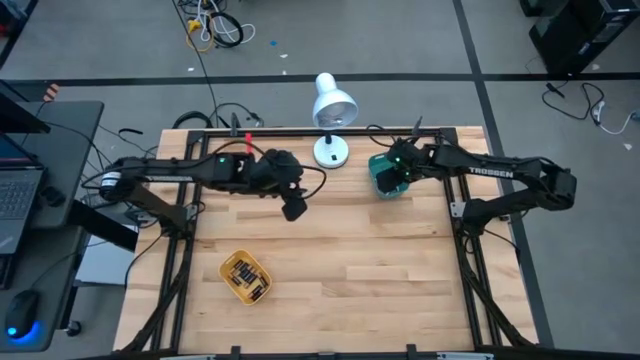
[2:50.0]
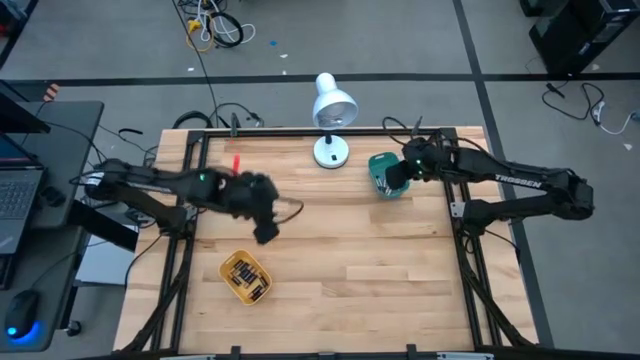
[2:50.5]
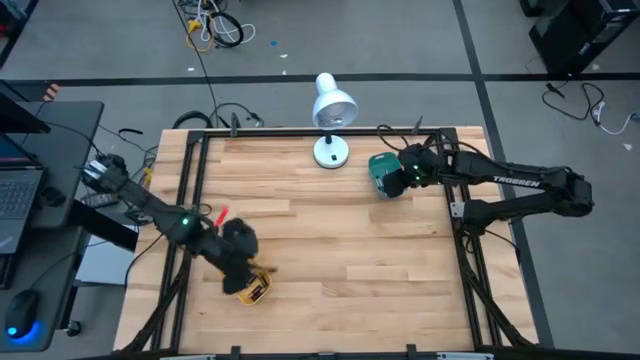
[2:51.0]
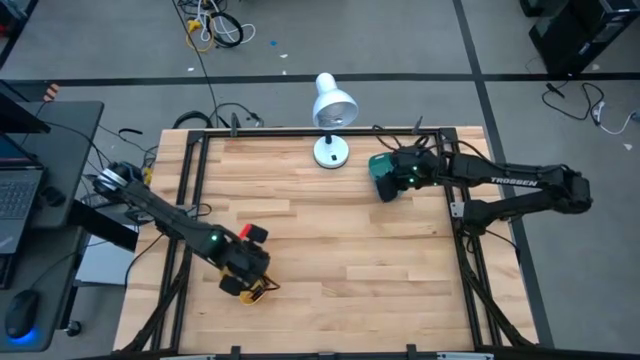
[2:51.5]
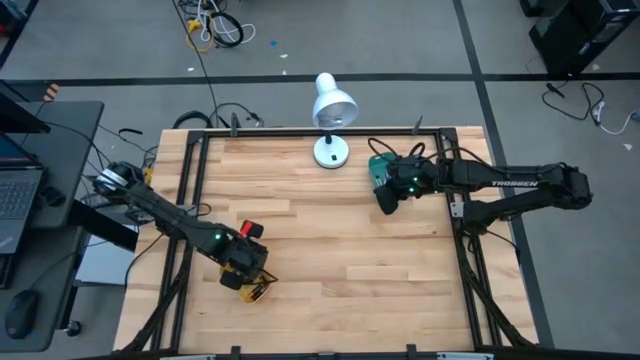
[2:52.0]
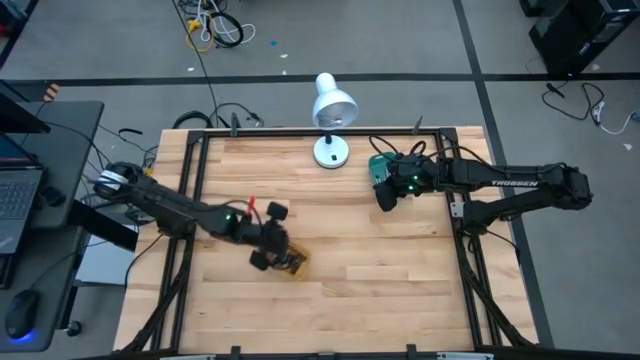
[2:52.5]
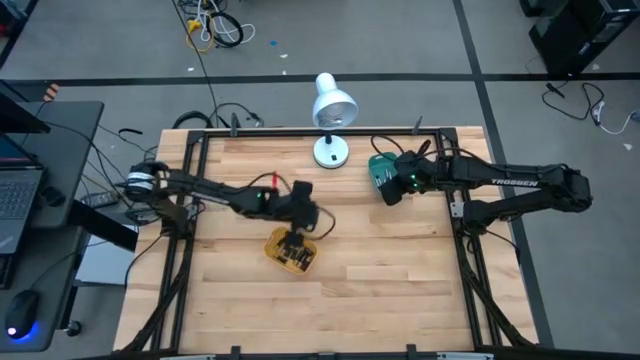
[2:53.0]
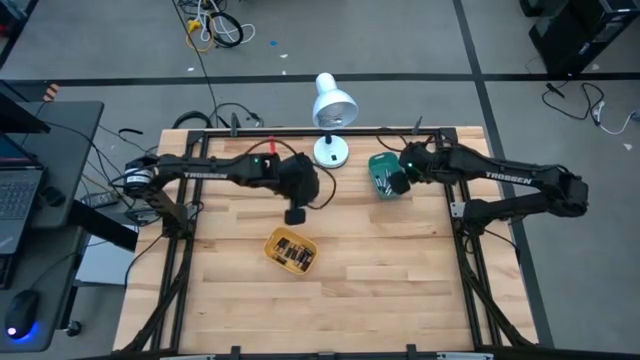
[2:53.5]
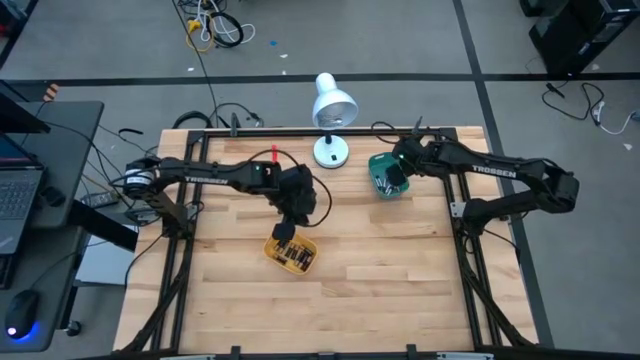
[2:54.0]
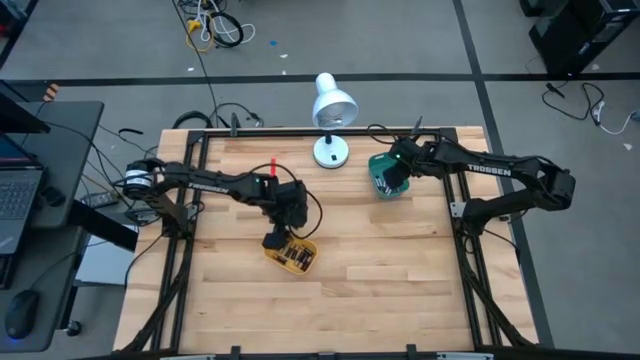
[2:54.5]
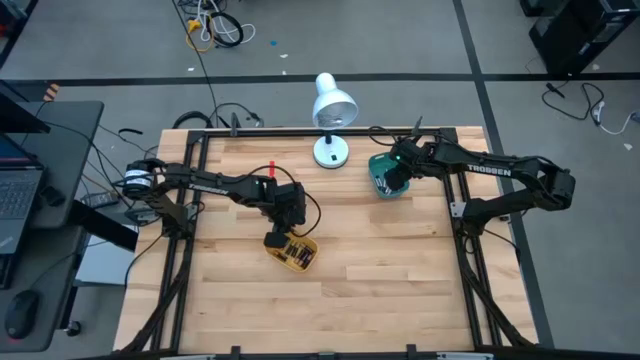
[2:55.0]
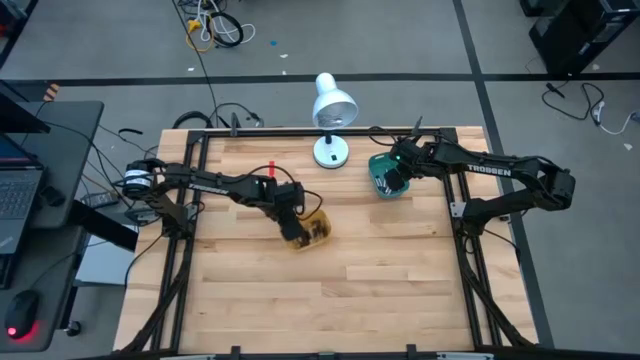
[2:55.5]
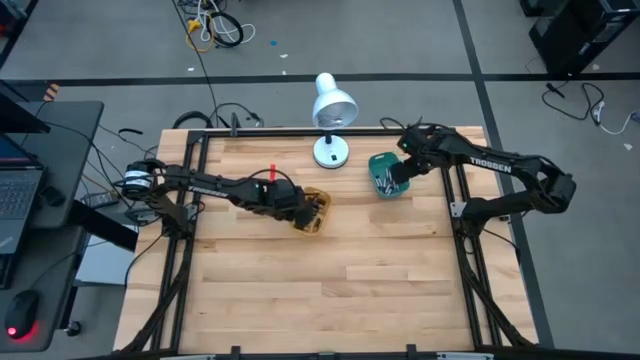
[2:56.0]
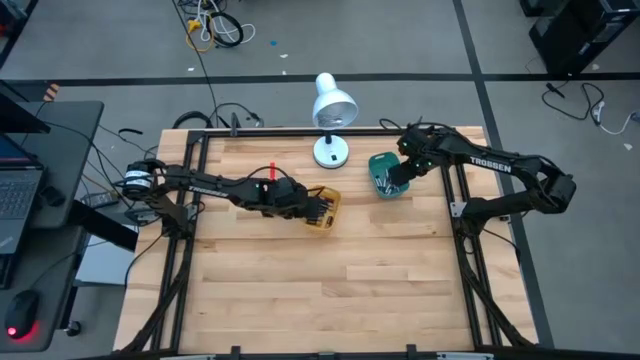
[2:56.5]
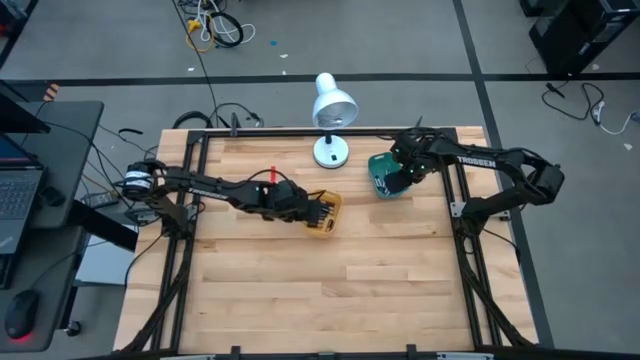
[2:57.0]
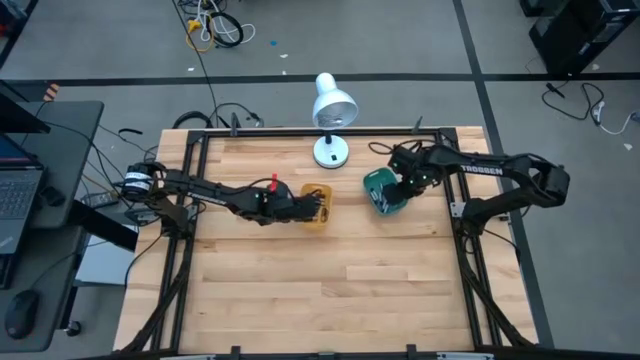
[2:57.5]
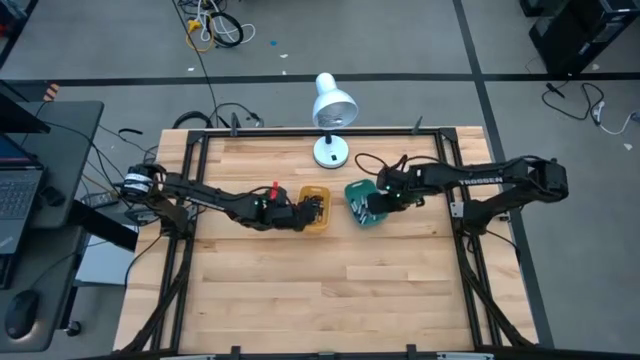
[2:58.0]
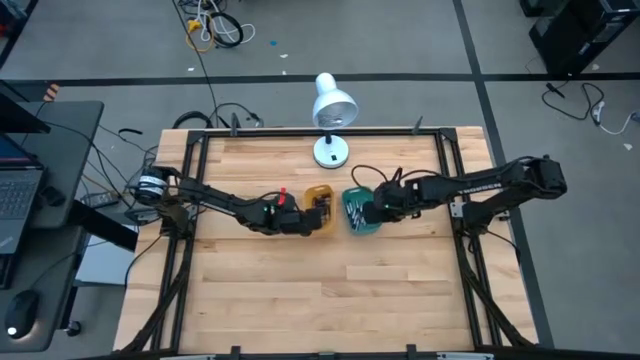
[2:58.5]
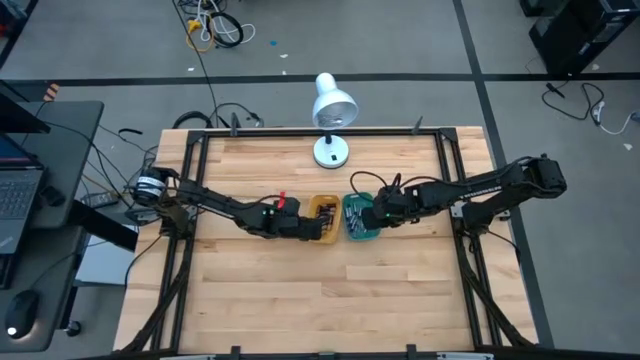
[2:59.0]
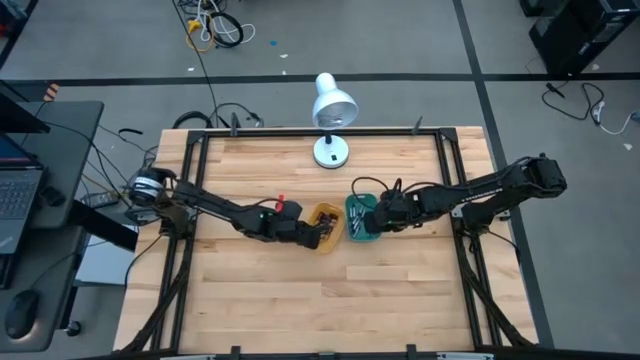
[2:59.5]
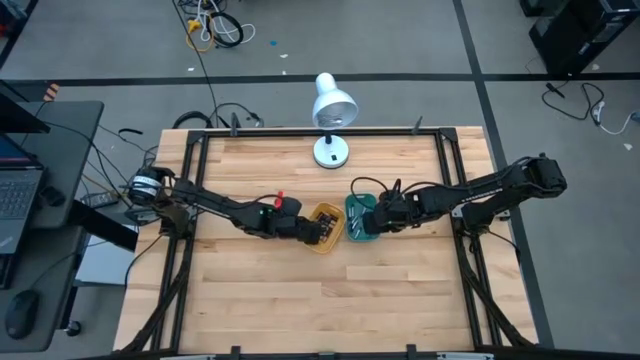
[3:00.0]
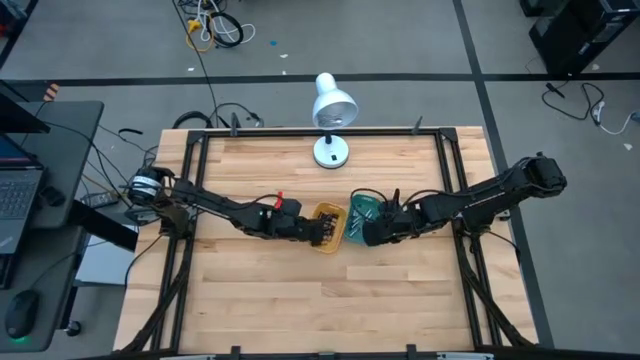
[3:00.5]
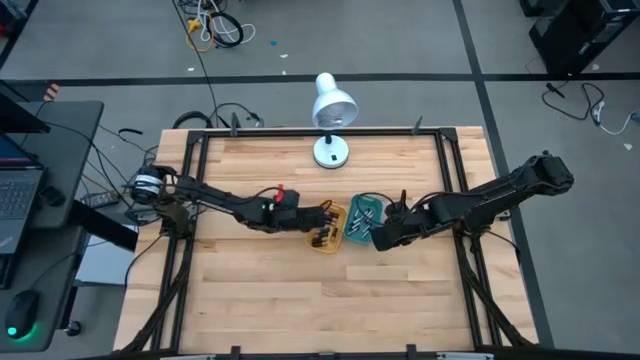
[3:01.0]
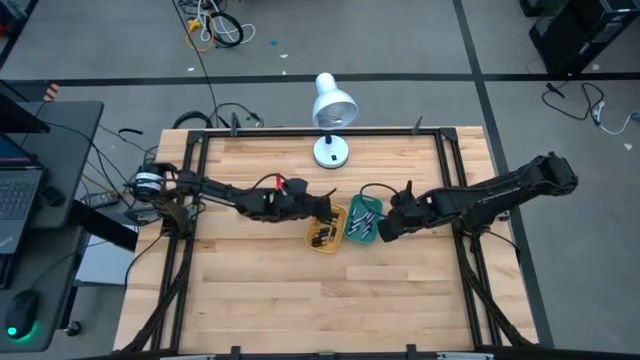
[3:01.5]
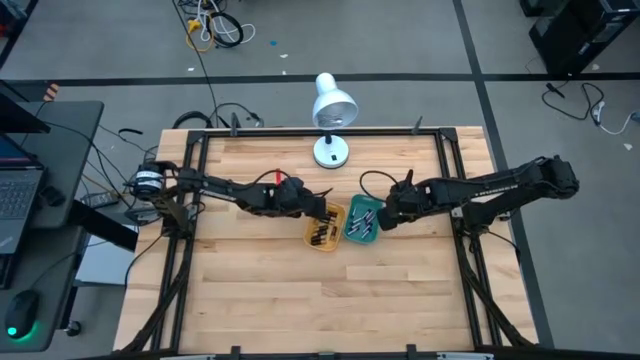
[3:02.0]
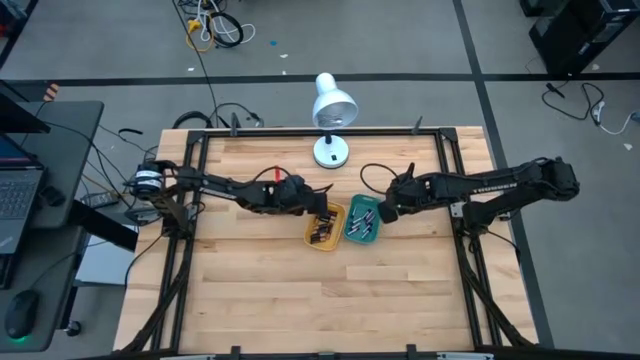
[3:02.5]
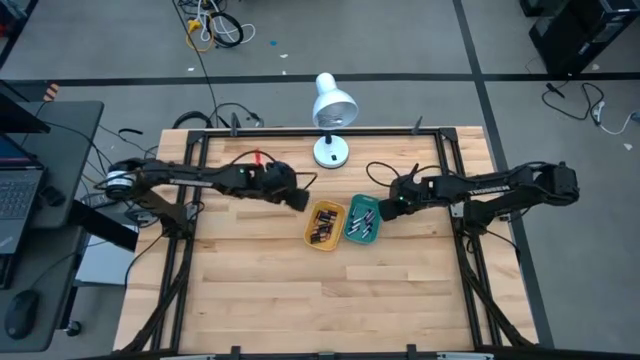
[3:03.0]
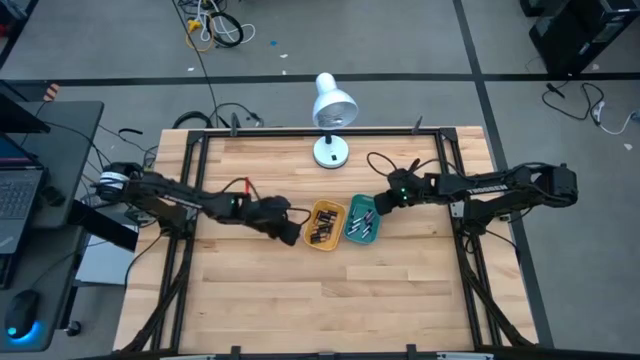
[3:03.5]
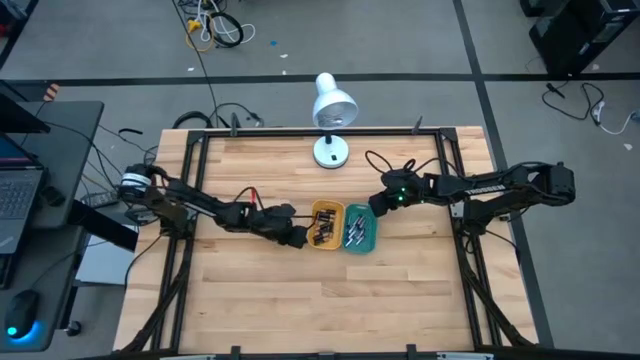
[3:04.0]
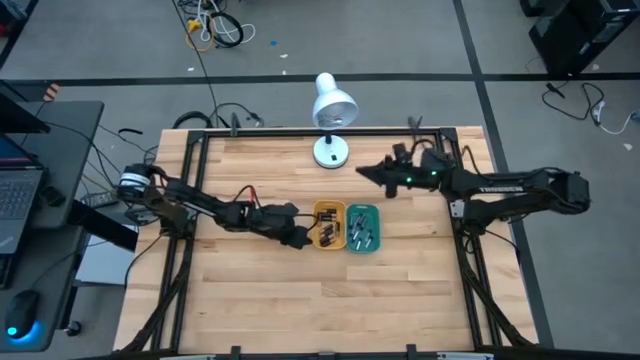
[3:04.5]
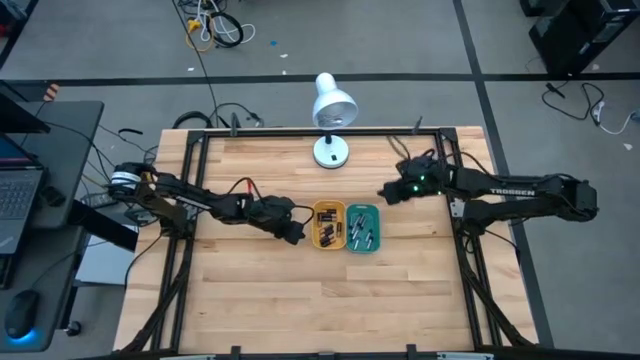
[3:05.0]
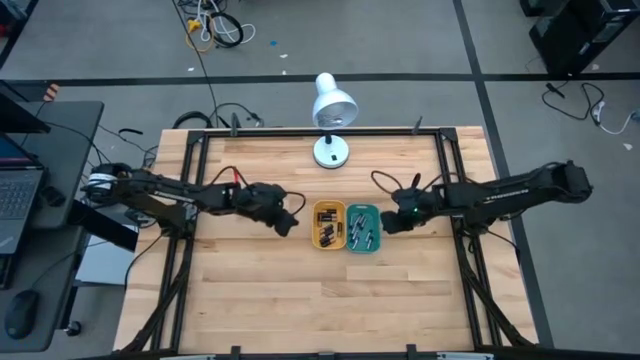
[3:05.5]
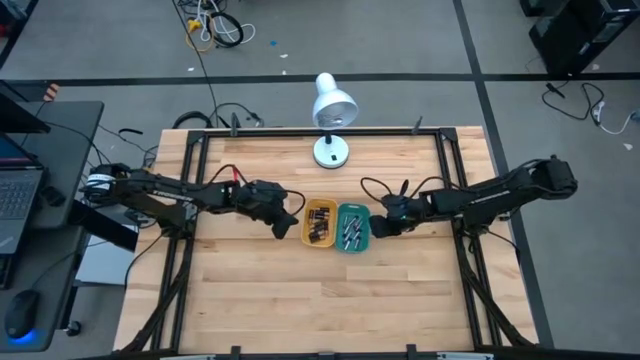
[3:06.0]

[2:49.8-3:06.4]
Task: Sort batteries
Return to Home Position

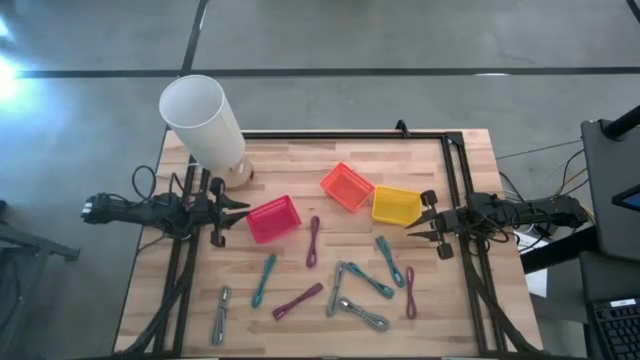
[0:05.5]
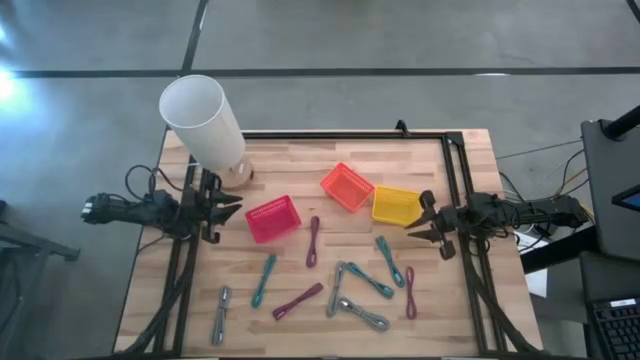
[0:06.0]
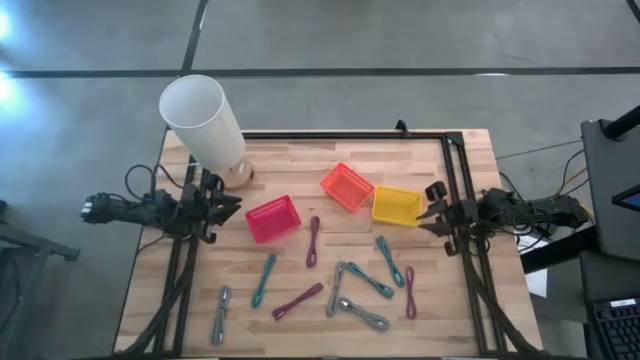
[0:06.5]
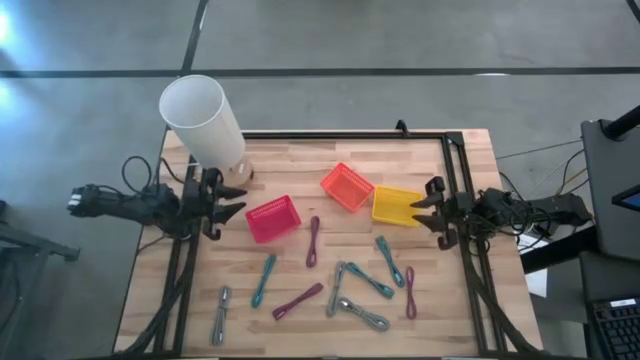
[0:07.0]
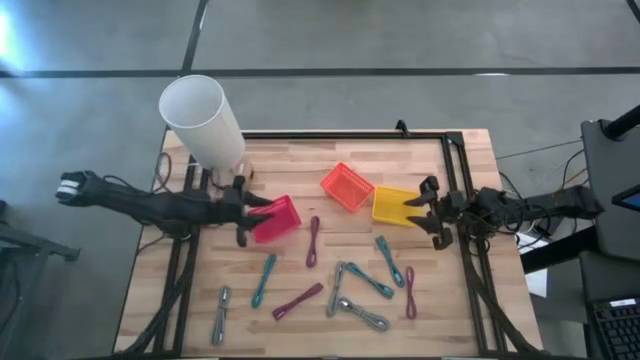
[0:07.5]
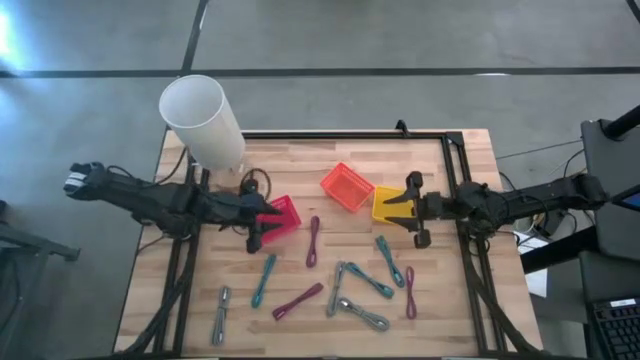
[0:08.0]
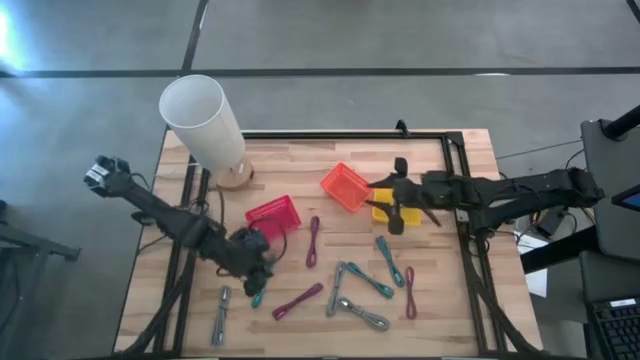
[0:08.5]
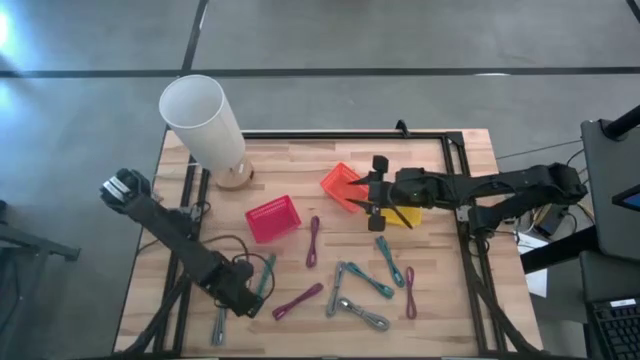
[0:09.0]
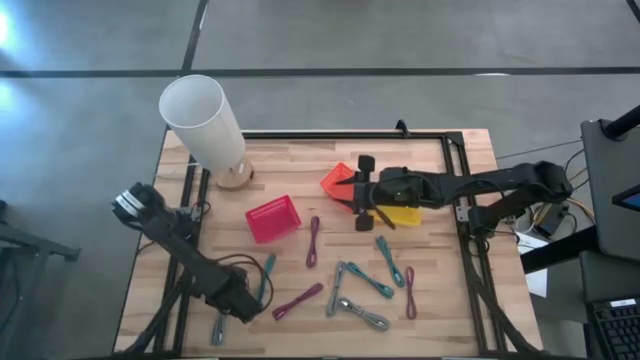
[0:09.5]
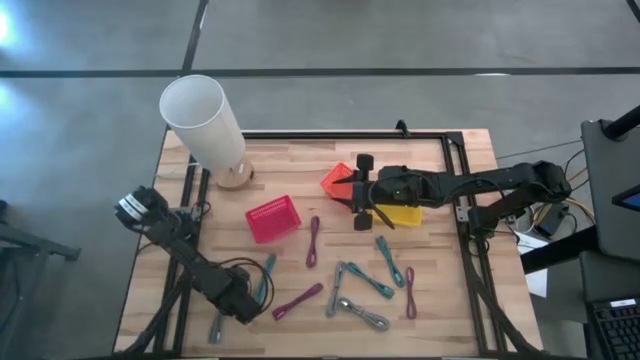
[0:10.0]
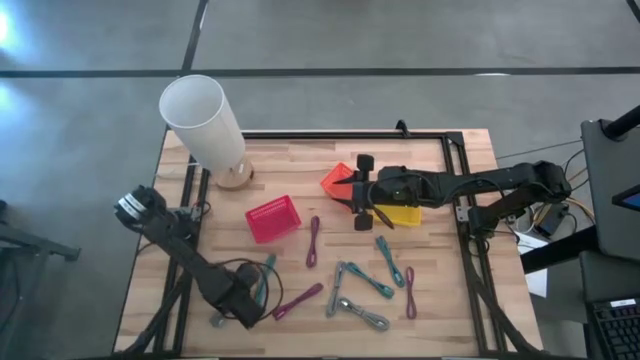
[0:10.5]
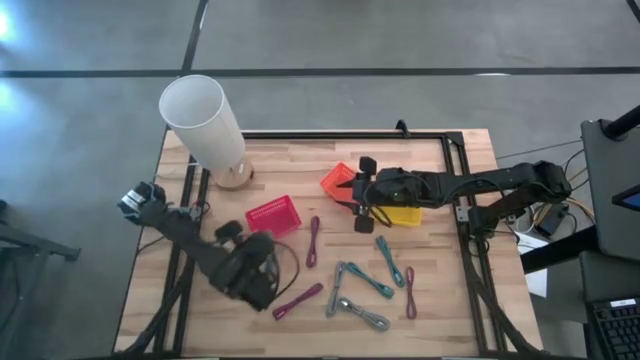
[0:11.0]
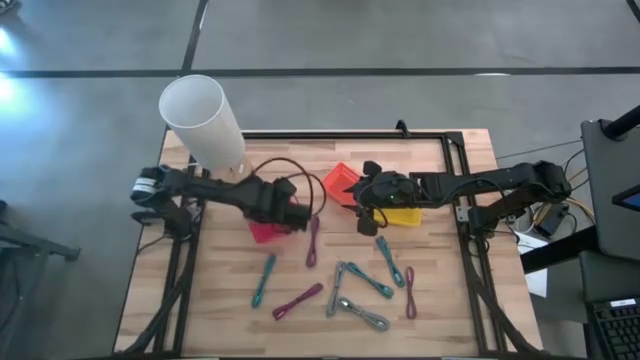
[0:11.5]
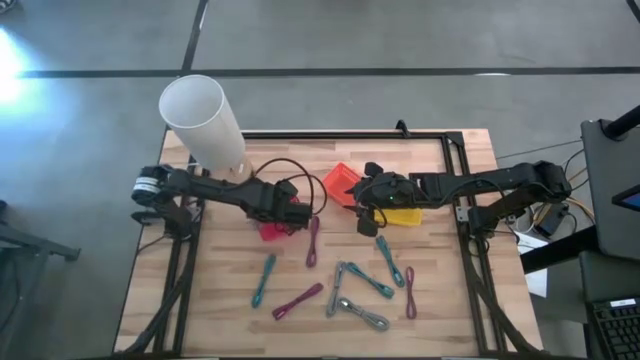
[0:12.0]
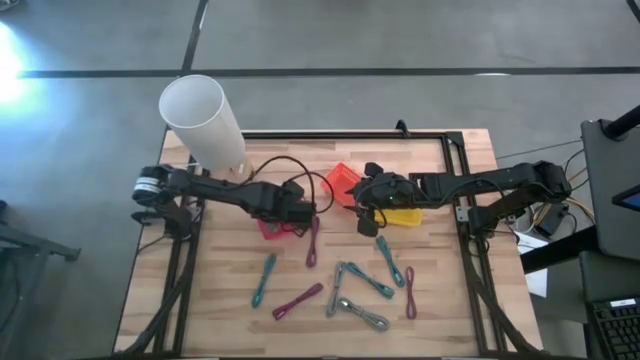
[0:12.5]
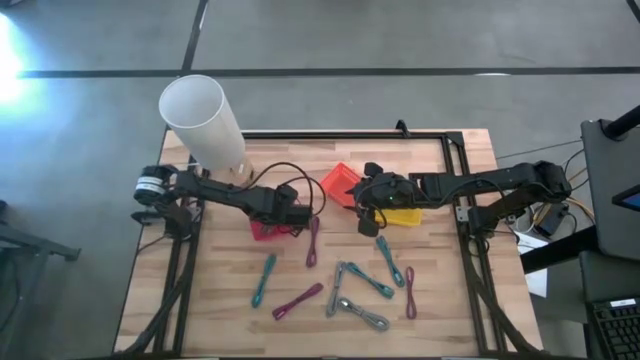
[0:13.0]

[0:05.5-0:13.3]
Task: Pick & Place USB Port
Put the bottom left black and white charger cable into the red bin
